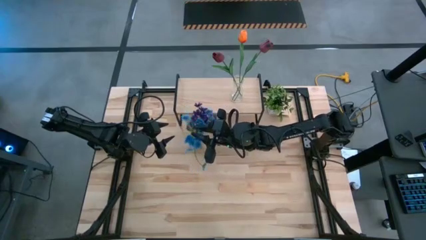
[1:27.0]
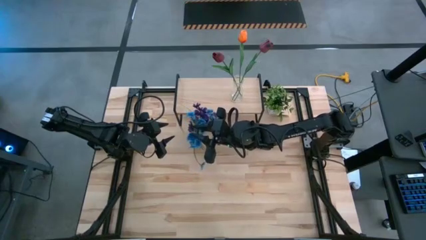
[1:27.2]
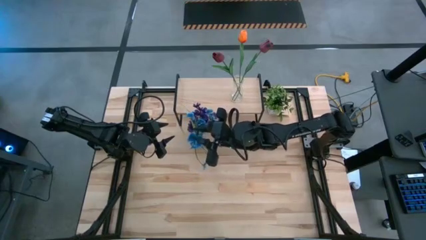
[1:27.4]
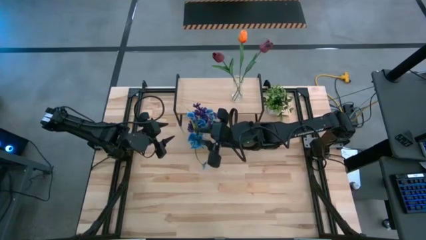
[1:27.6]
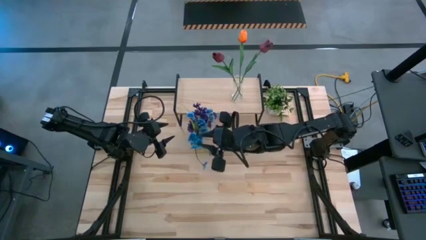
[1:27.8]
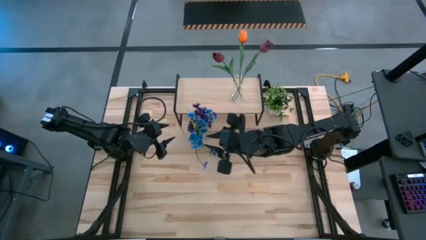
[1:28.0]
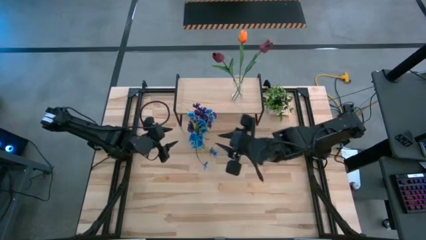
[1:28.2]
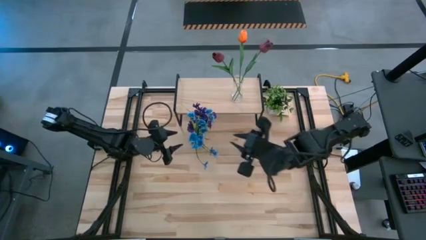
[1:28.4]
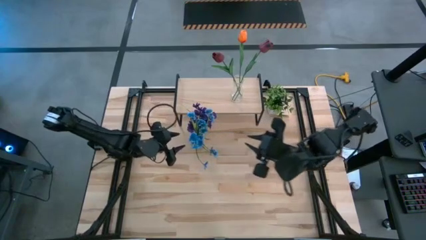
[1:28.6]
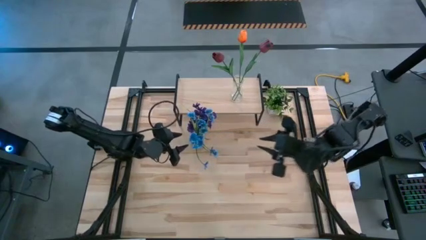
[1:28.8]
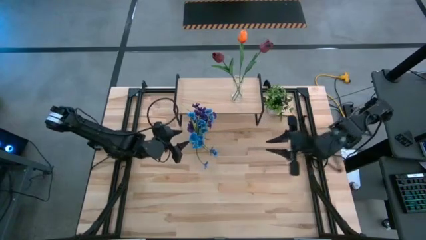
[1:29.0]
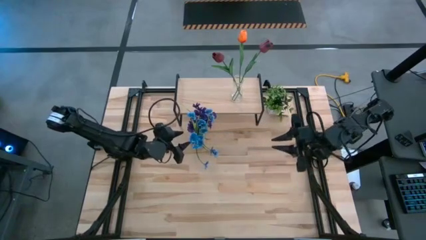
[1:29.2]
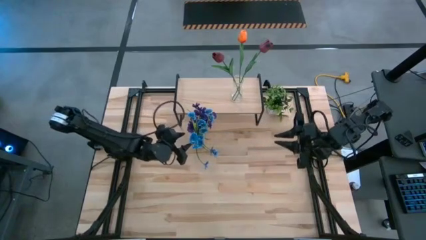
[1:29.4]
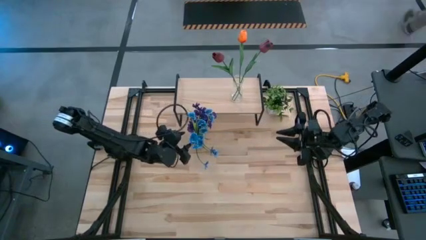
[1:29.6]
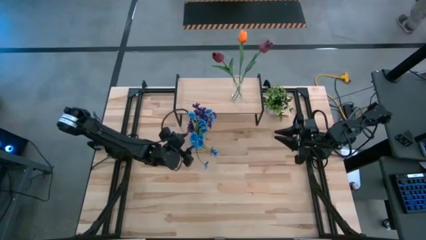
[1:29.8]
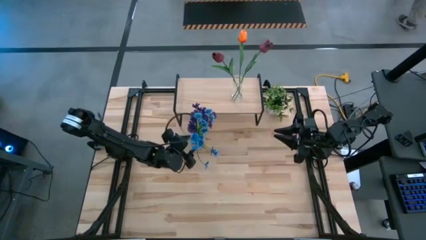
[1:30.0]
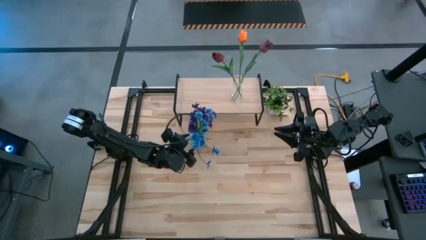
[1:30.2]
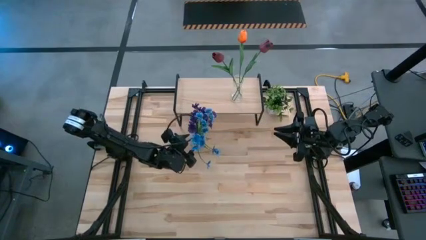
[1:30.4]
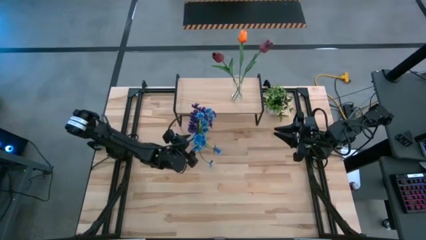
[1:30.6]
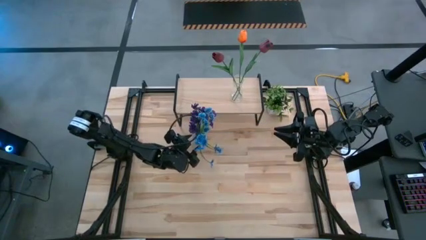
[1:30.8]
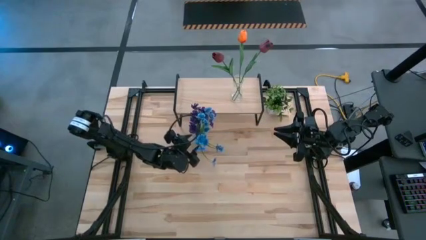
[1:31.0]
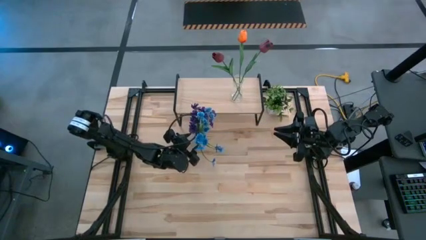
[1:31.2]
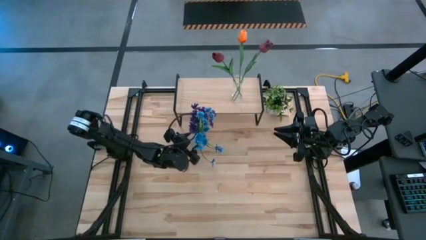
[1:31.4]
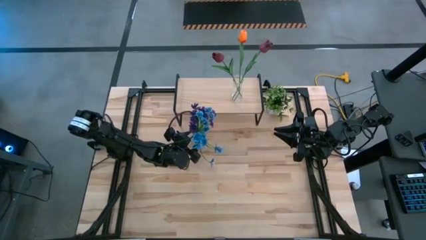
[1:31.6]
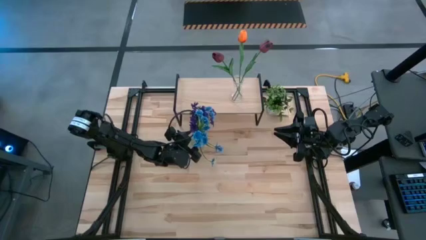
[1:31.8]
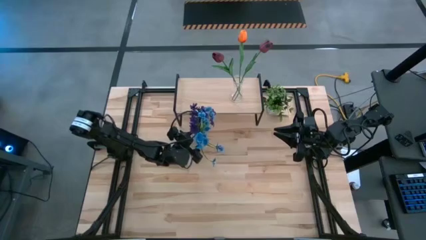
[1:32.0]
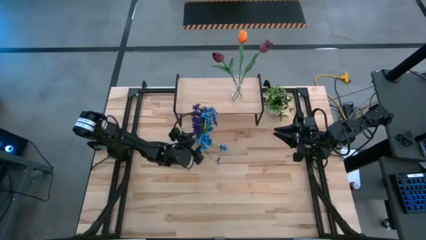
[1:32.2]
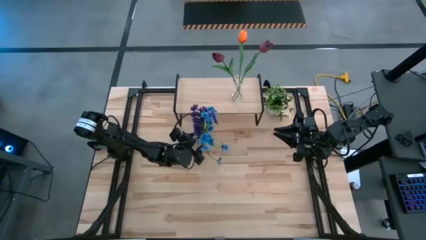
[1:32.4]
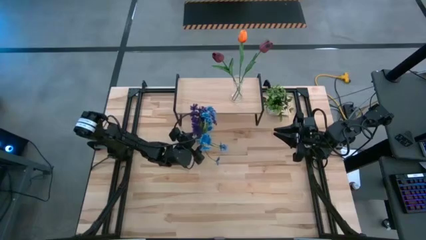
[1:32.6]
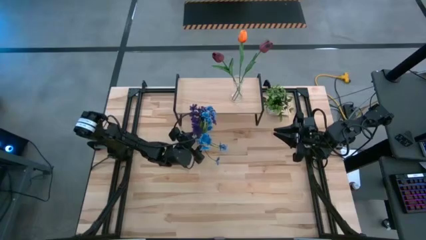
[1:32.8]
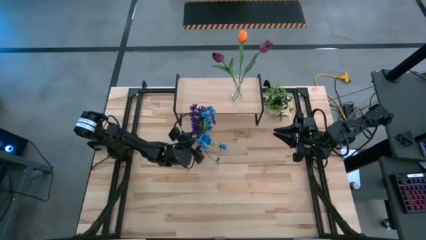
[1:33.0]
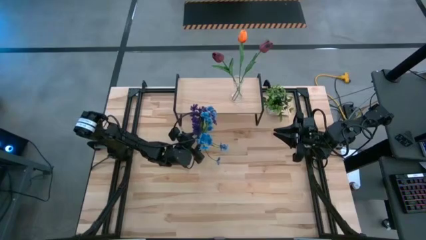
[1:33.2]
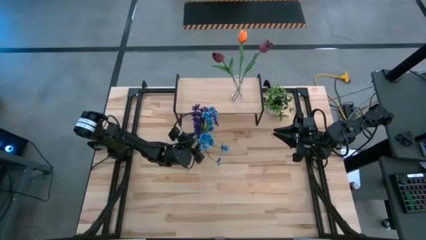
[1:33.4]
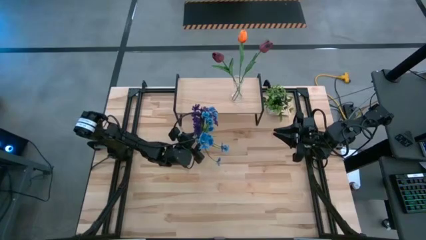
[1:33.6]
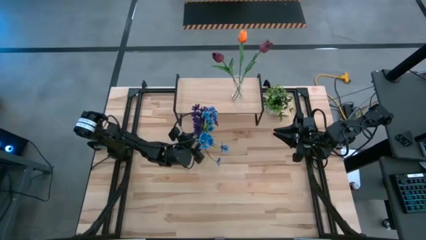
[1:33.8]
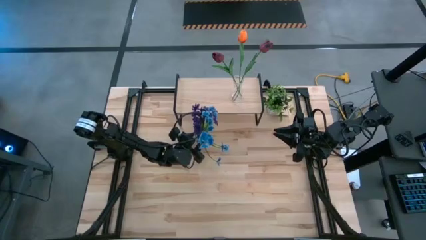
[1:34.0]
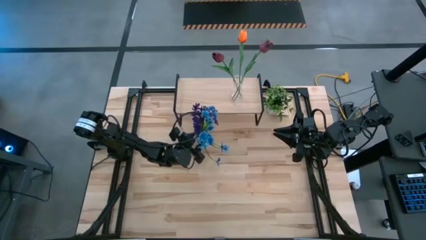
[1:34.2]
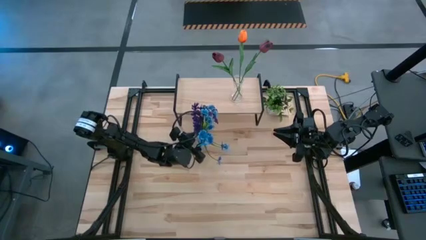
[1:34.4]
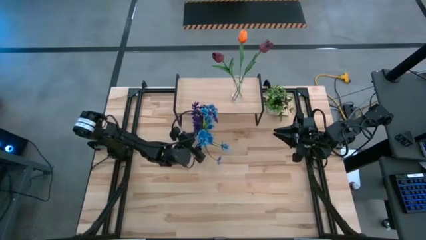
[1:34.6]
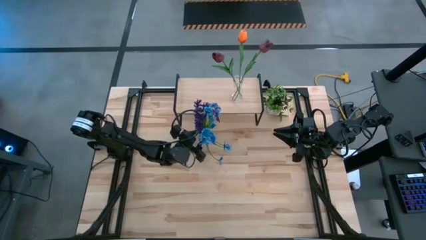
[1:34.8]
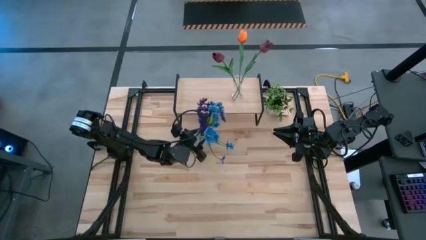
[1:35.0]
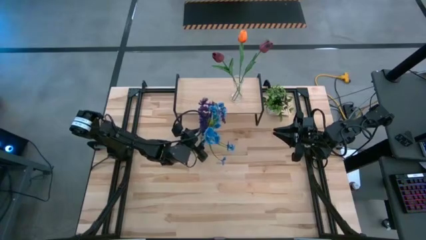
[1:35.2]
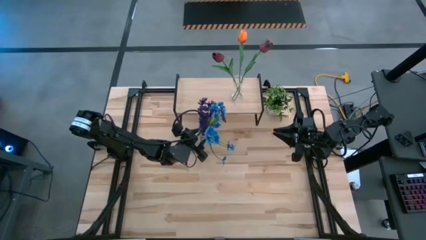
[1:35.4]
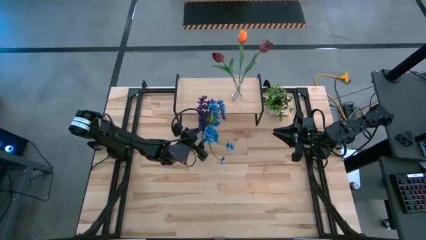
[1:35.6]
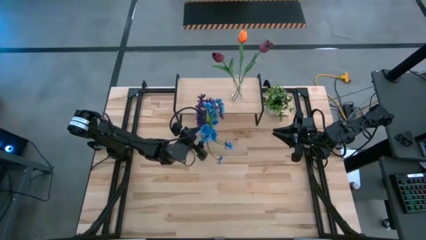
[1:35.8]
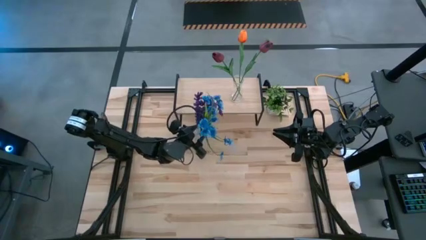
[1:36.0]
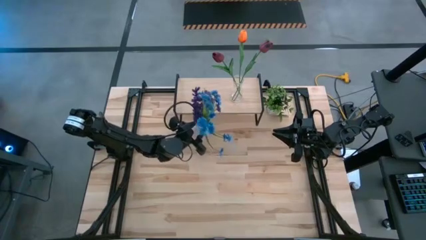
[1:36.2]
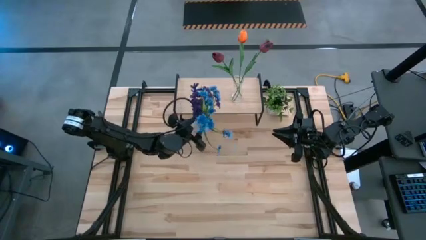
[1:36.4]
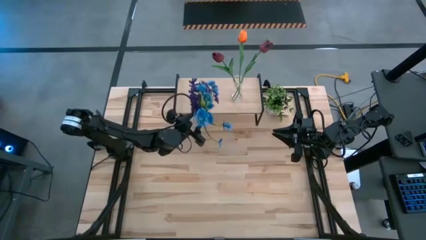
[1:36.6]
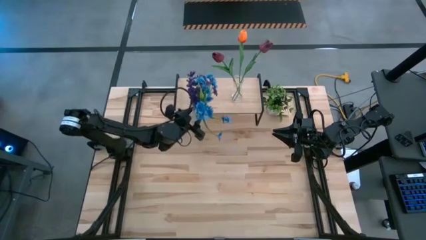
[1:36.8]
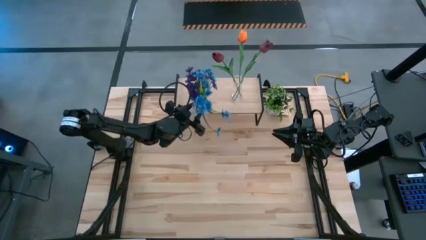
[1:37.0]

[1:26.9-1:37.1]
Task: Pick and place flowers into a vace then onto a shelf
Put the left transparent vase with flowers on the shelf
